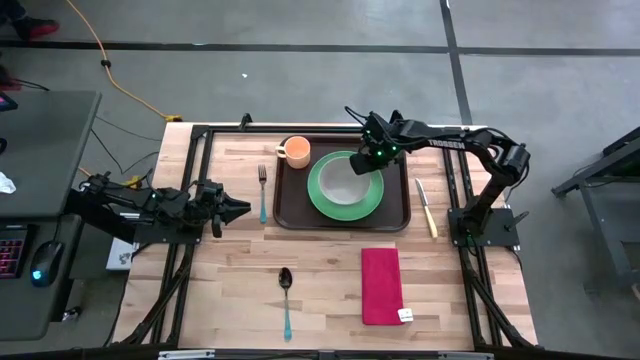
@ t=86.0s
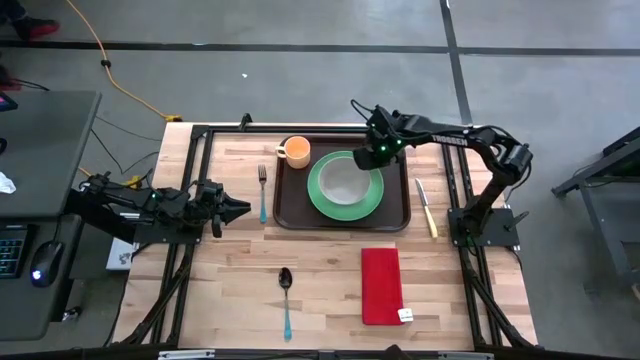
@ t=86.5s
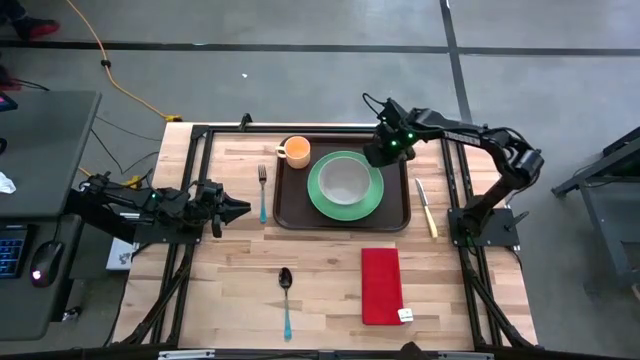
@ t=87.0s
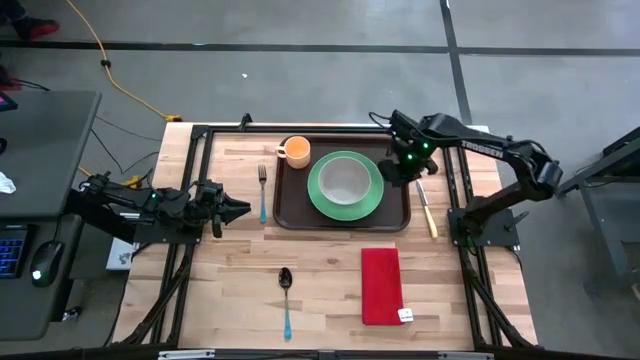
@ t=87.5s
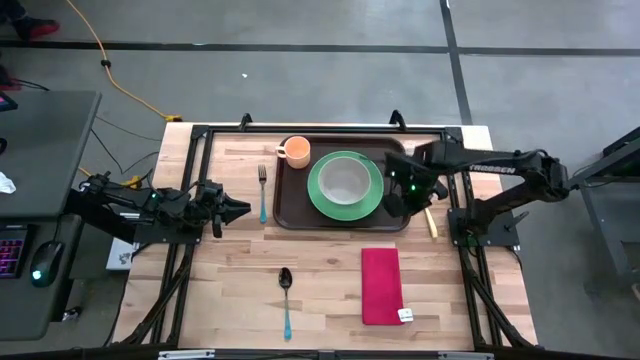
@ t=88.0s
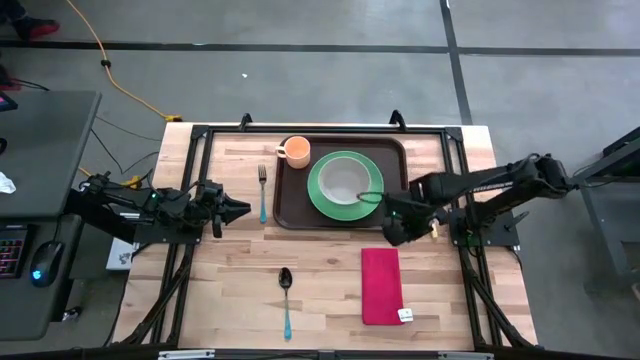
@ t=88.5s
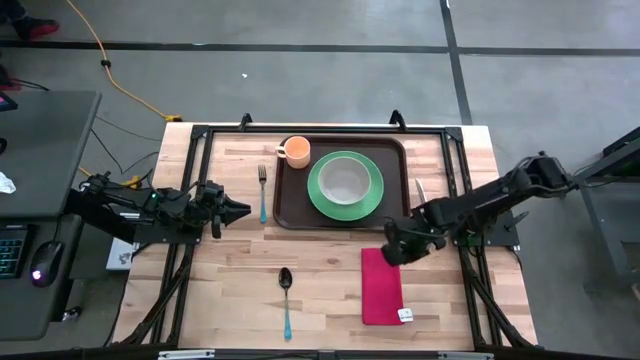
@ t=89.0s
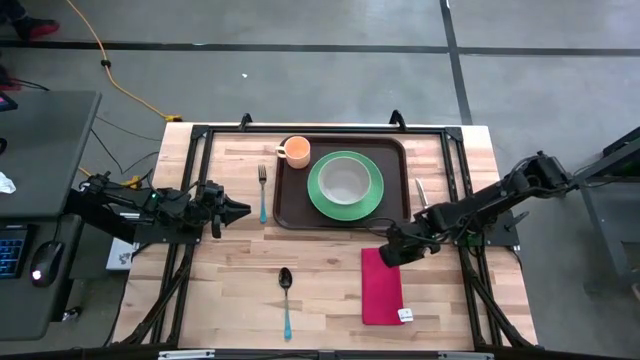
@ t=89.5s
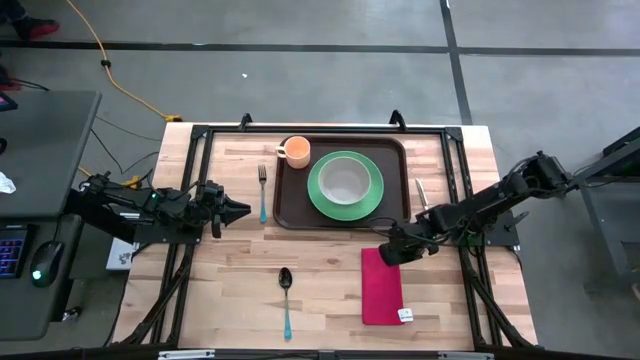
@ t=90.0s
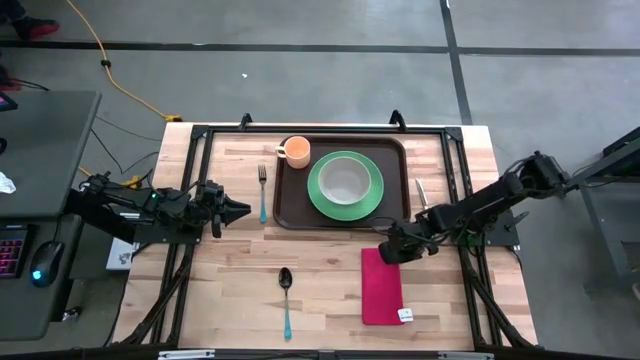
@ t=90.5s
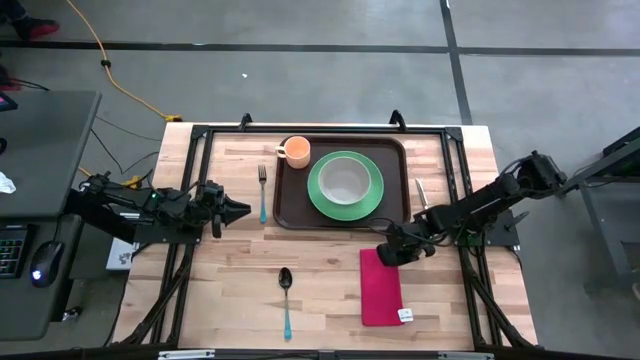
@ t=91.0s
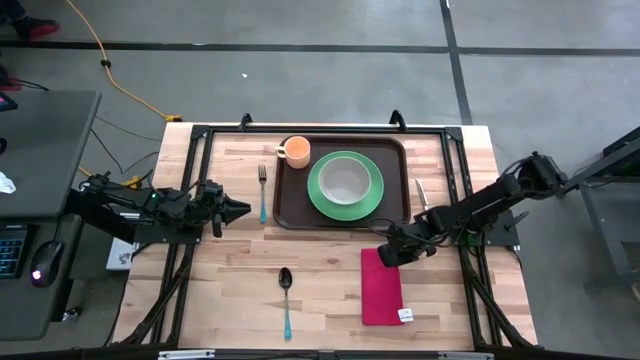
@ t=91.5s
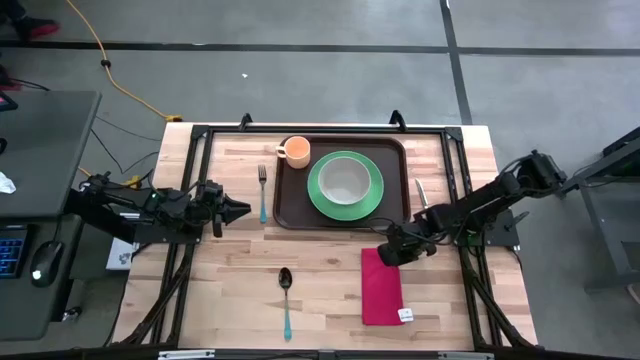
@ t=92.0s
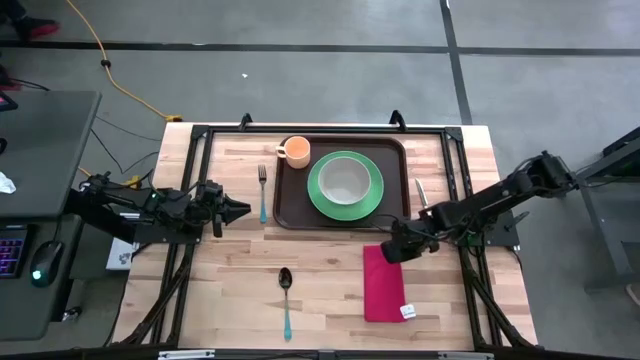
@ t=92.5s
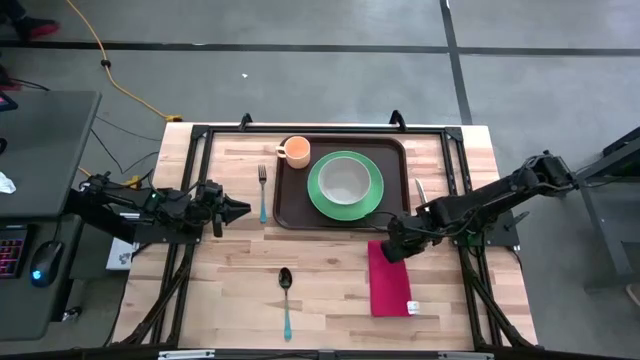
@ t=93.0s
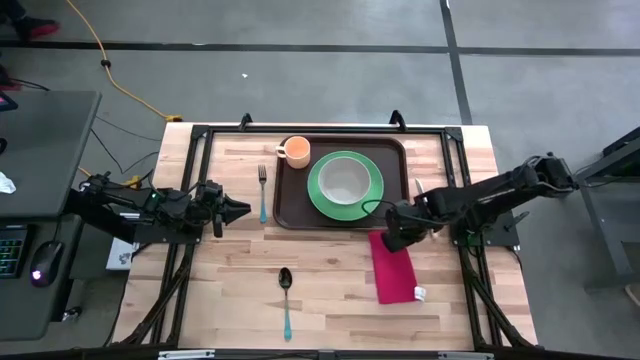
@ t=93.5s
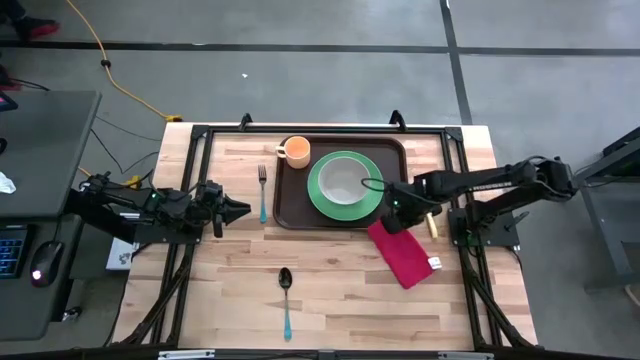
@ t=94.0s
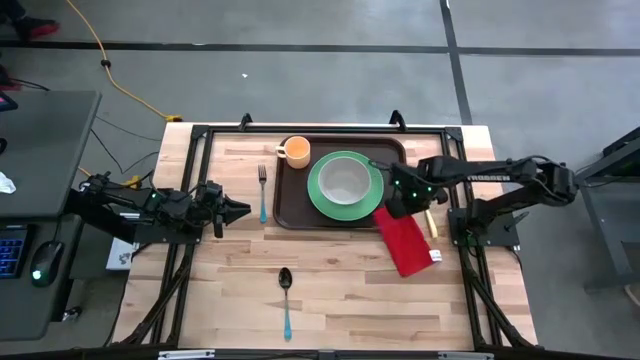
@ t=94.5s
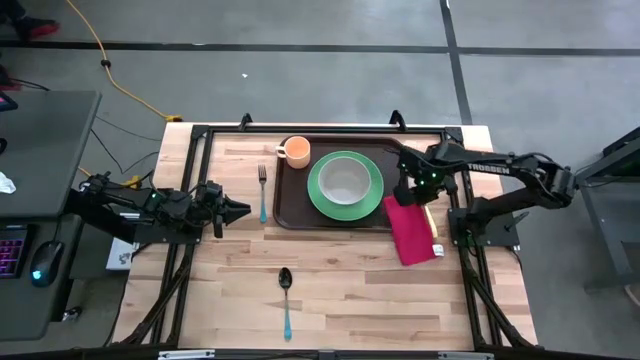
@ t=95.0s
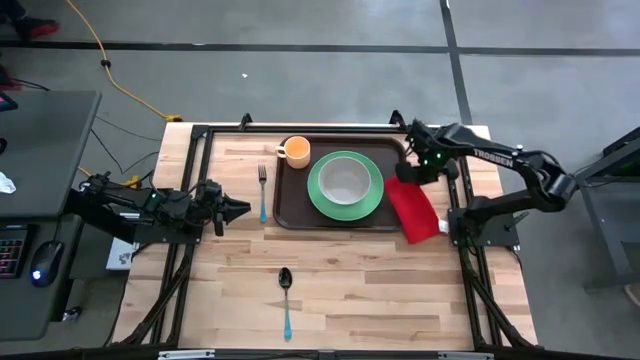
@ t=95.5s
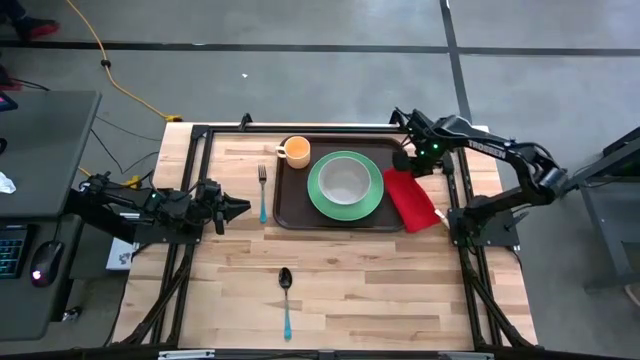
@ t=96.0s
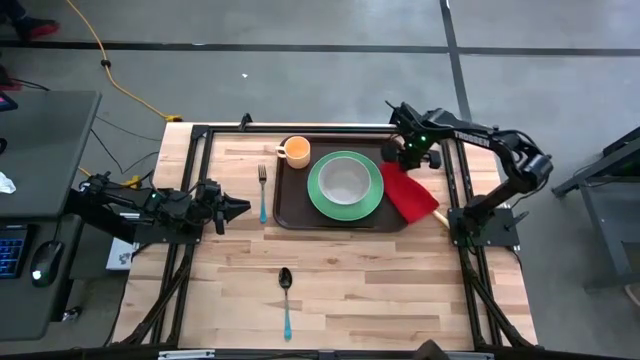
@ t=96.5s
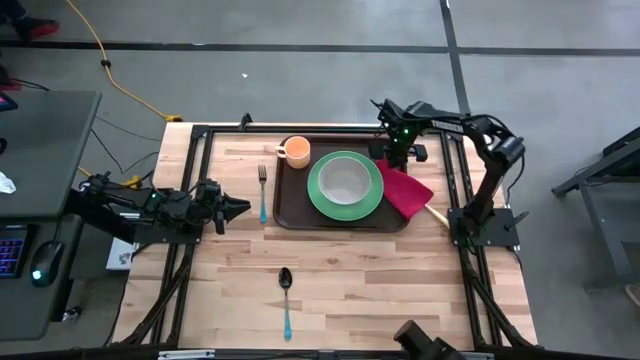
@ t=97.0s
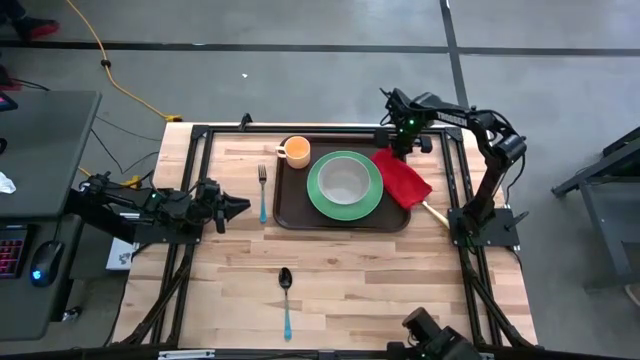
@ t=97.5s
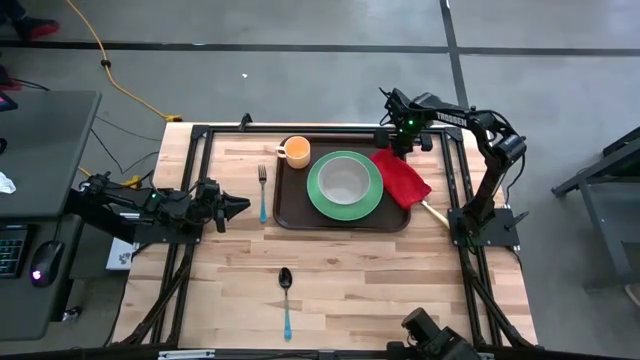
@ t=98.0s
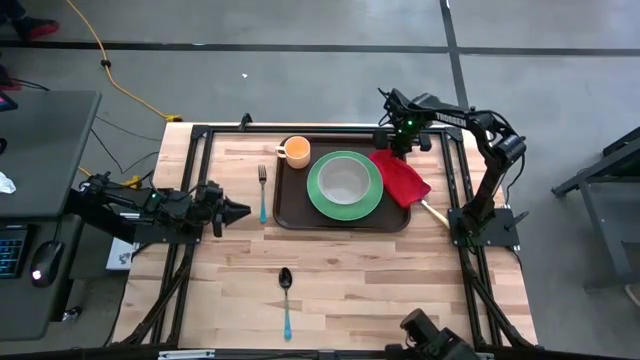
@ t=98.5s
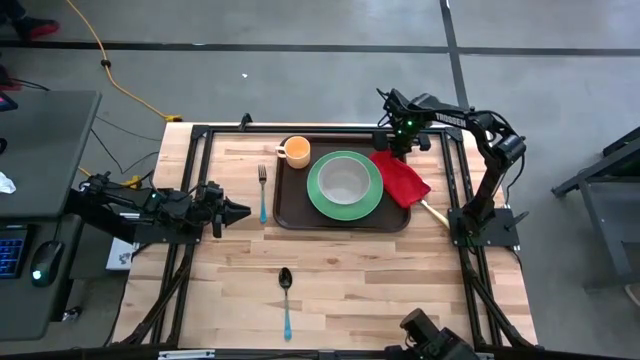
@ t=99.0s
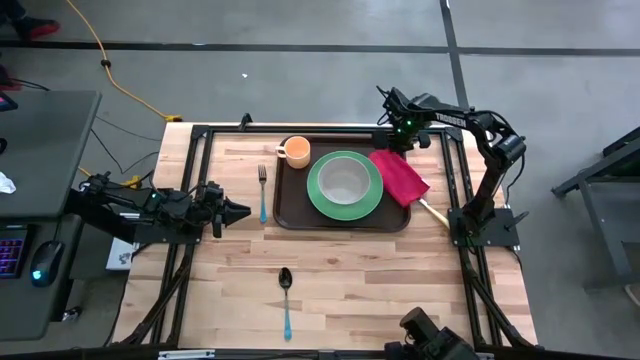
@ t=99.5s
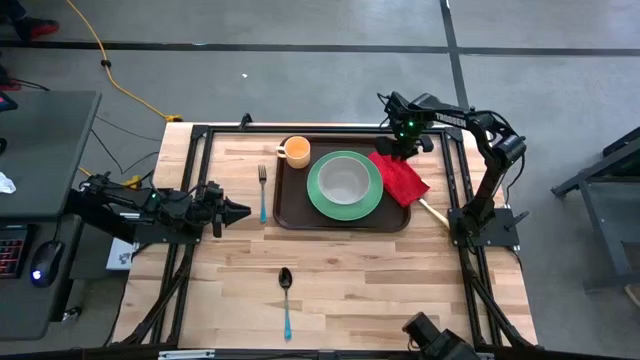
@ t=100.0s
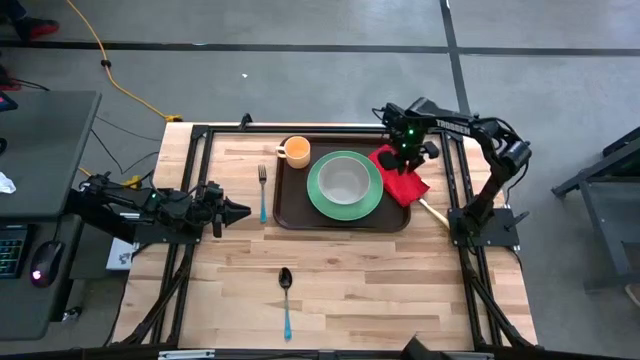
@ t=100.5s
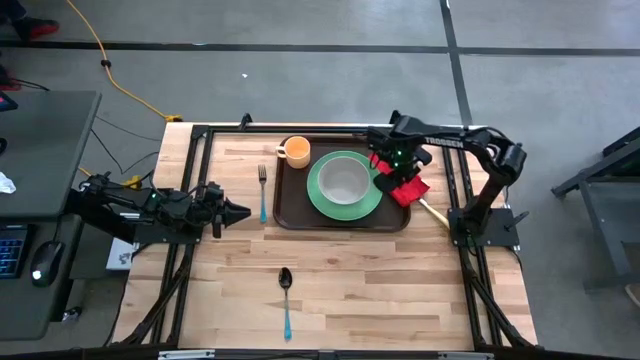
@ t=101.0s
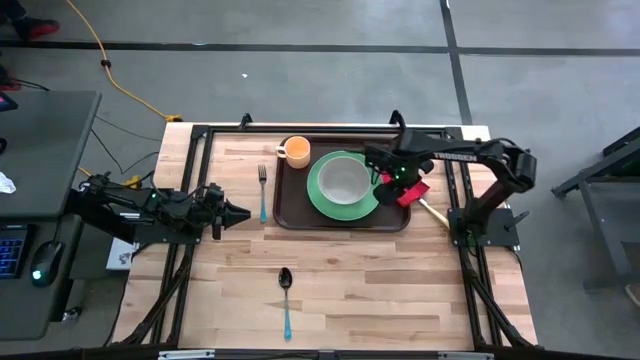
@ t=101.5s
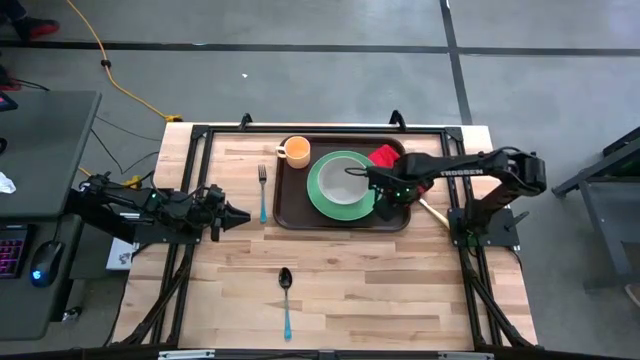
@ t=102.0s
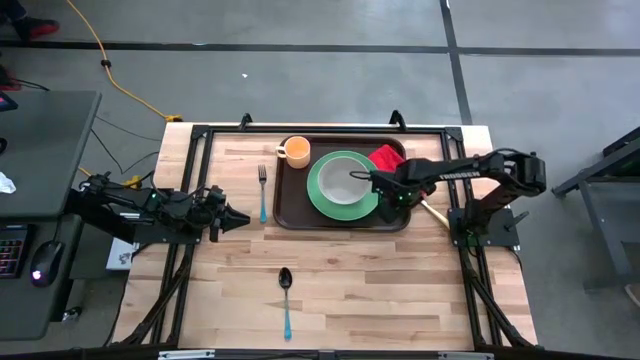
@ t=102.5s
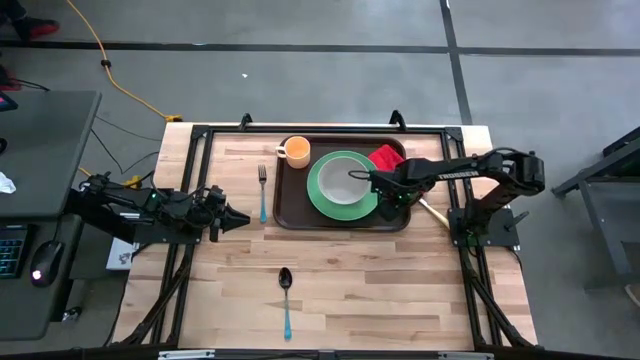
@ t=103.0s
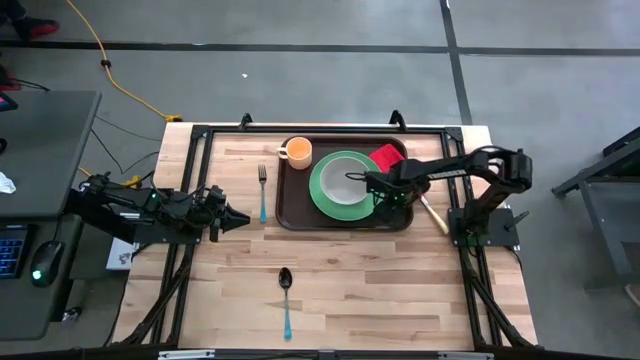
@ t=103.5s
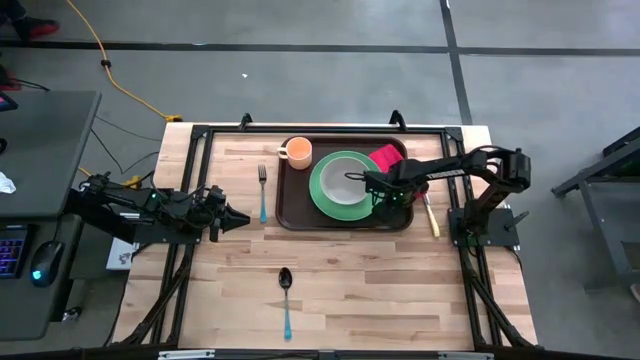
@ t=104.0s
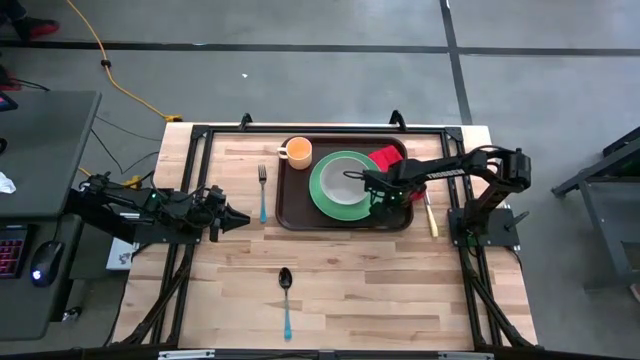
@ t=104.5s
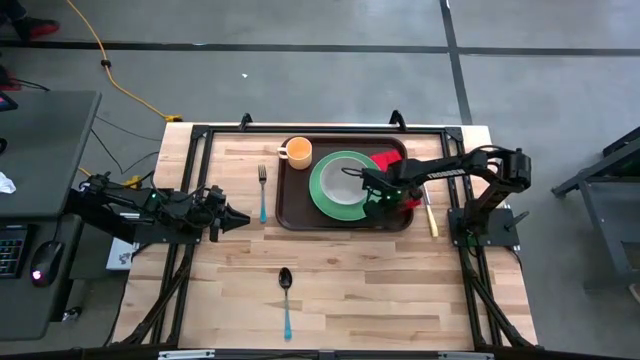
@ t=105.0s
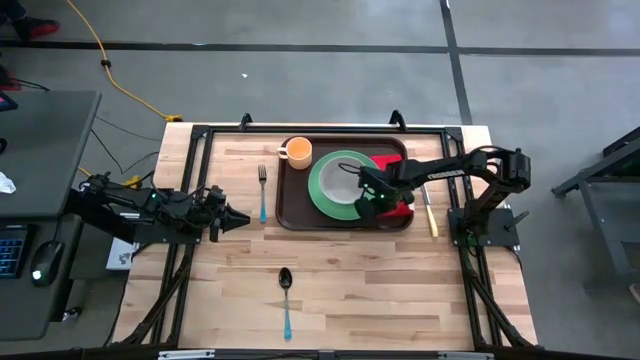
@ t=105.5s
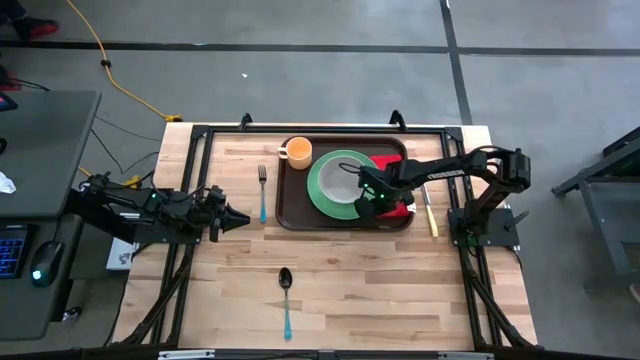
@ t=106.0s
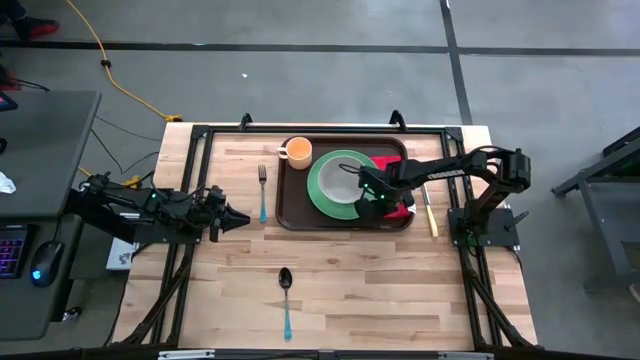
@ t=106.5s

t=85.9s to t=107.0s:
Task: Set up tray
Put the red table napkin to the right of the green plate on the brown tray

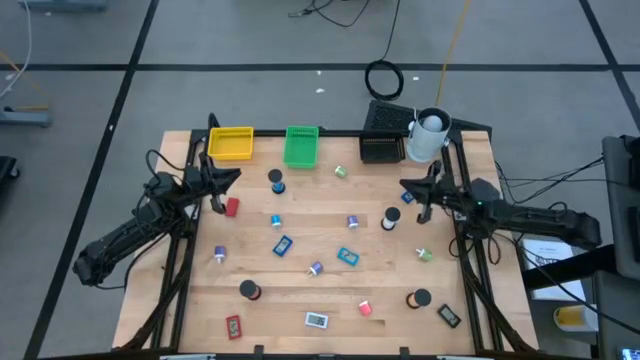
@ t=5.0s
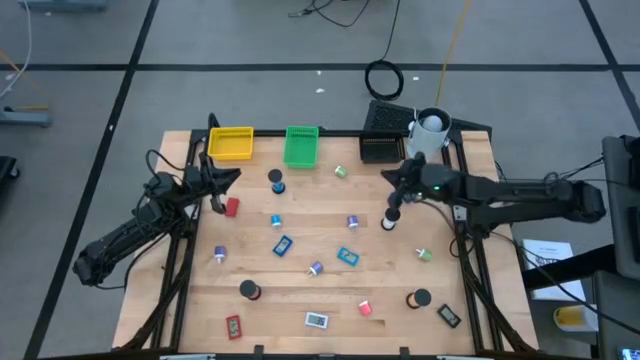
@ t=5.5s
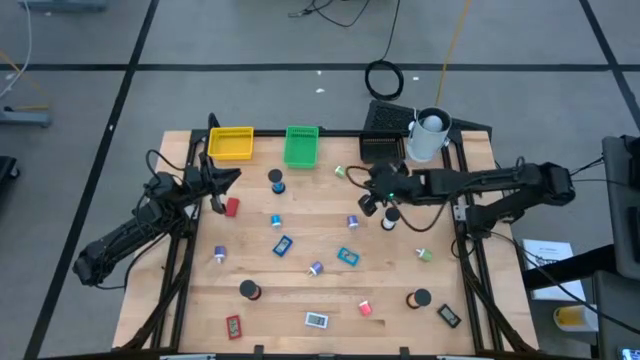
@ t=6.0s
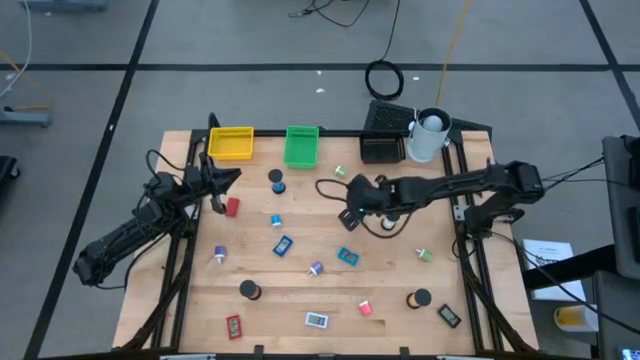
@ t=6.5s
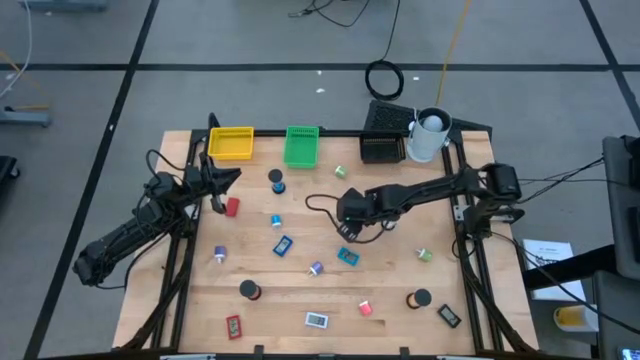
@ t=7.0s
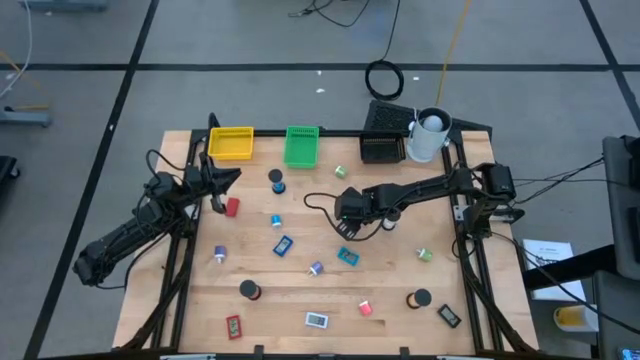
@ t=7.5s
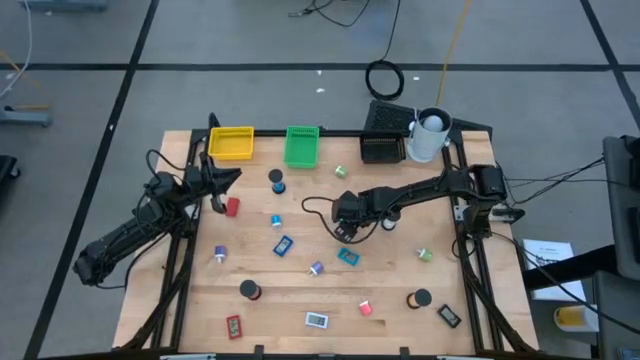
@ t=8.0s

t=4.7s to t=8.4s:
Task: Pick & Place Office items
Put the right blue charger adapter into the black bin
